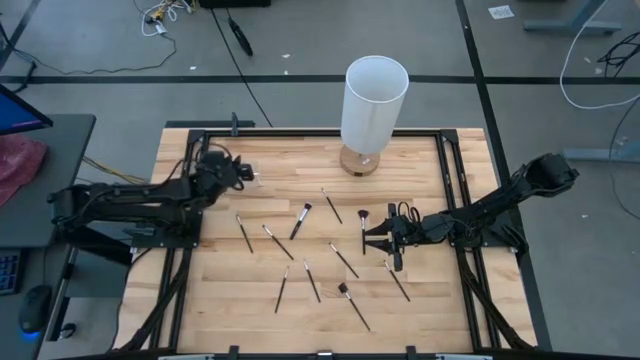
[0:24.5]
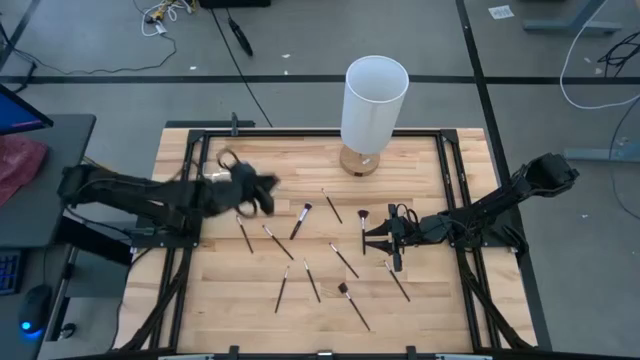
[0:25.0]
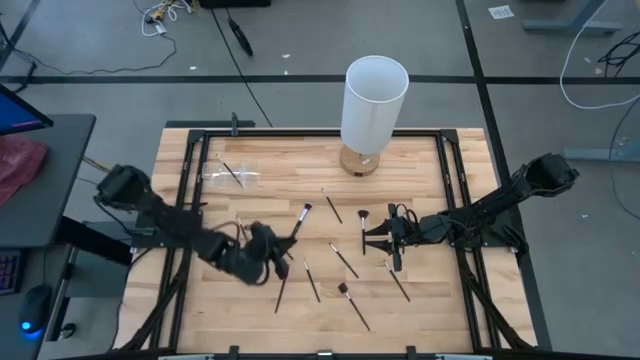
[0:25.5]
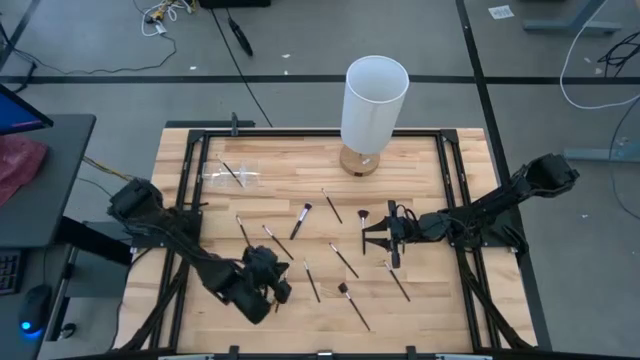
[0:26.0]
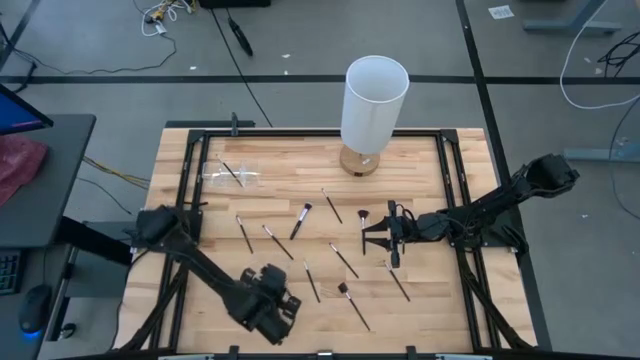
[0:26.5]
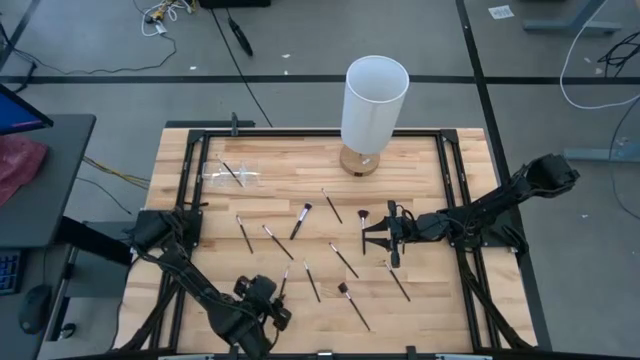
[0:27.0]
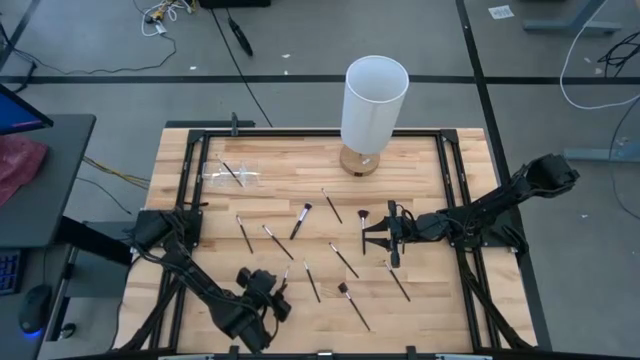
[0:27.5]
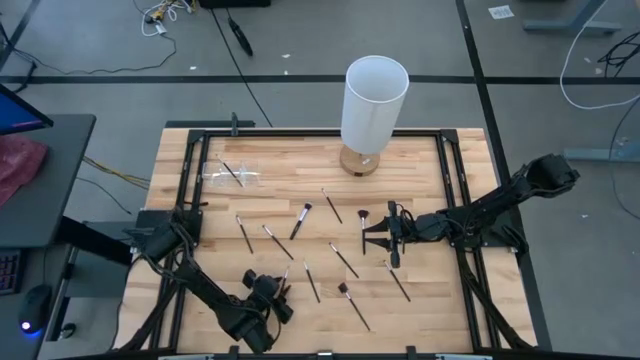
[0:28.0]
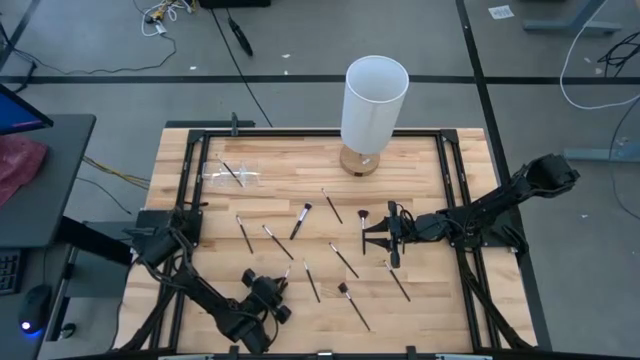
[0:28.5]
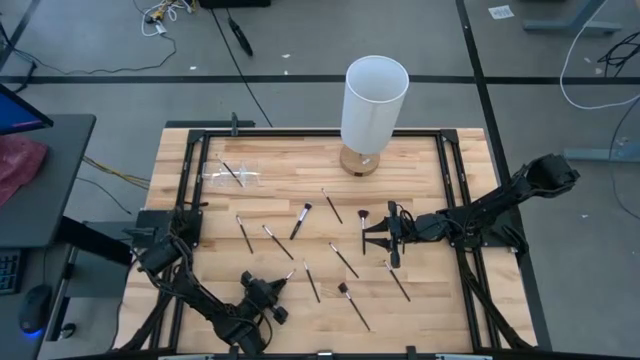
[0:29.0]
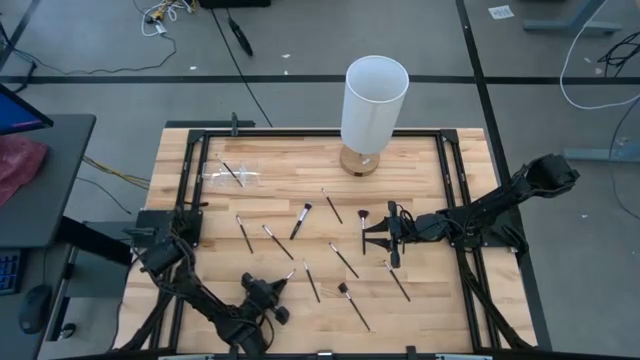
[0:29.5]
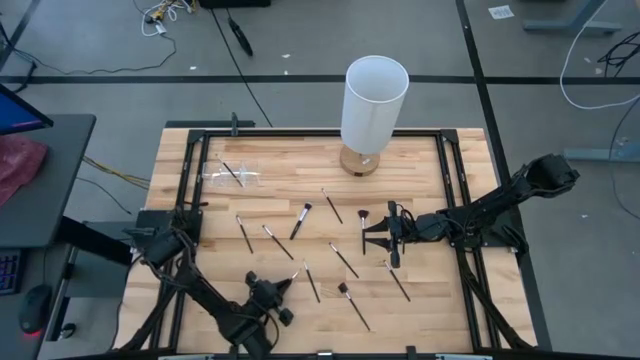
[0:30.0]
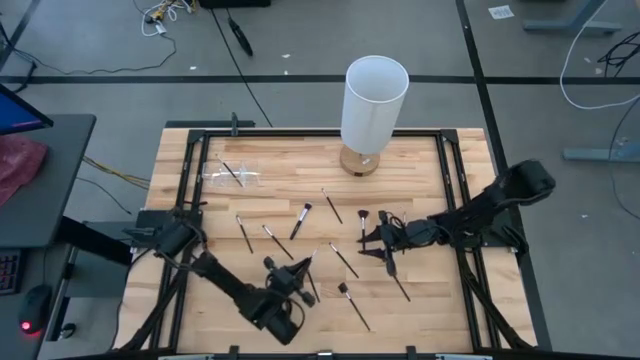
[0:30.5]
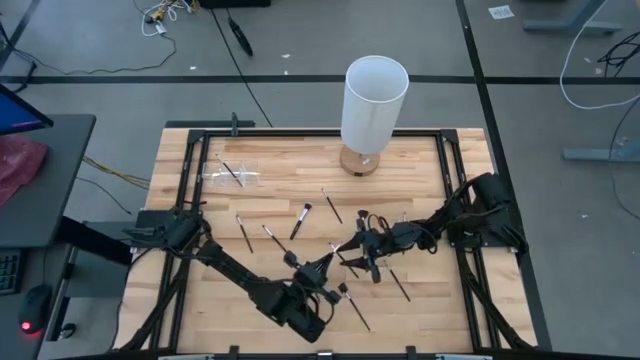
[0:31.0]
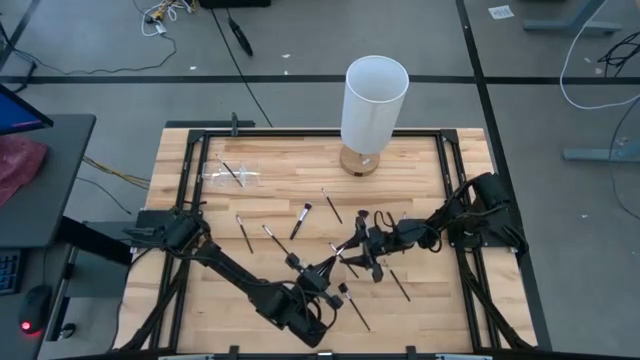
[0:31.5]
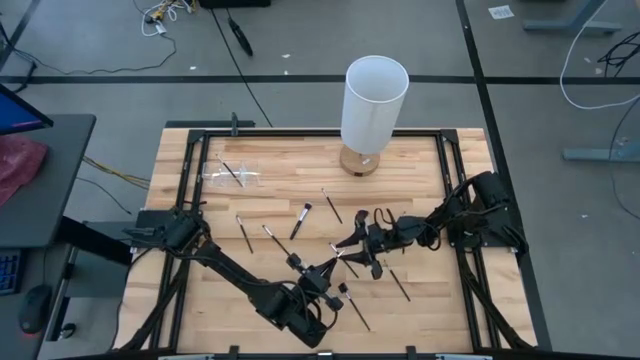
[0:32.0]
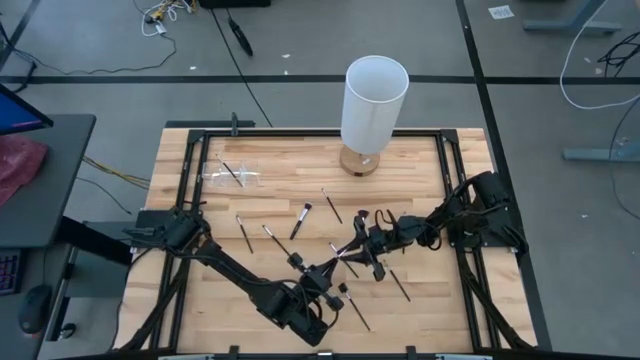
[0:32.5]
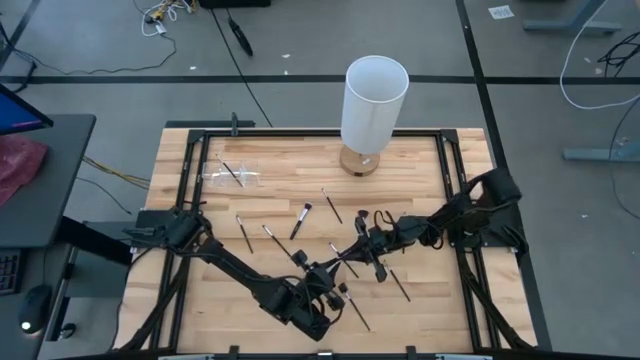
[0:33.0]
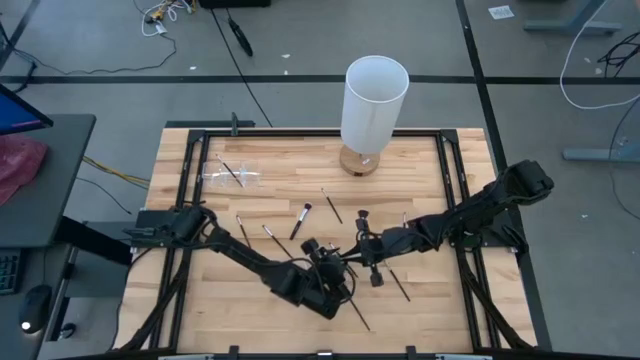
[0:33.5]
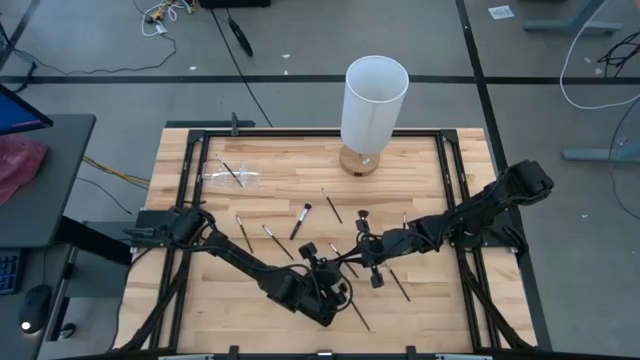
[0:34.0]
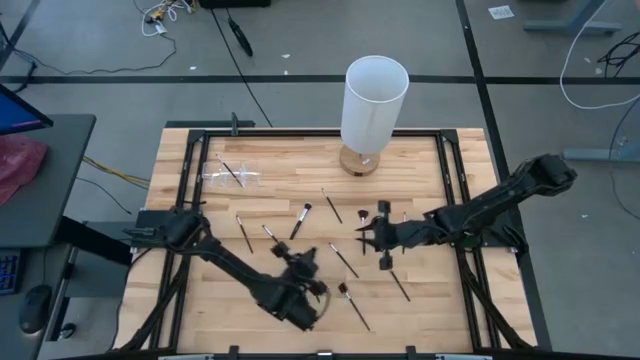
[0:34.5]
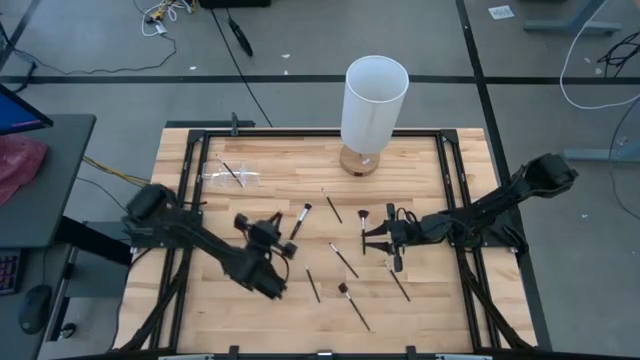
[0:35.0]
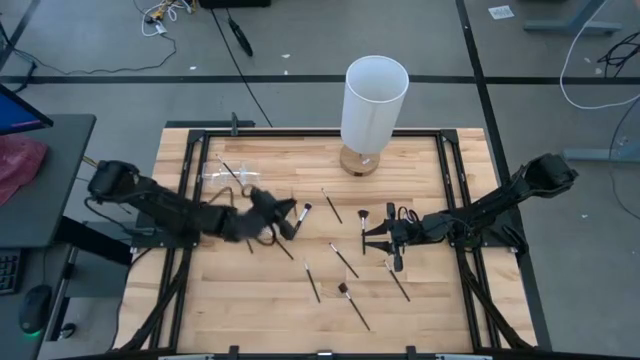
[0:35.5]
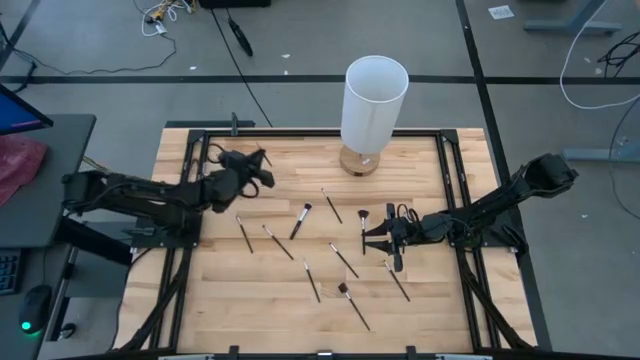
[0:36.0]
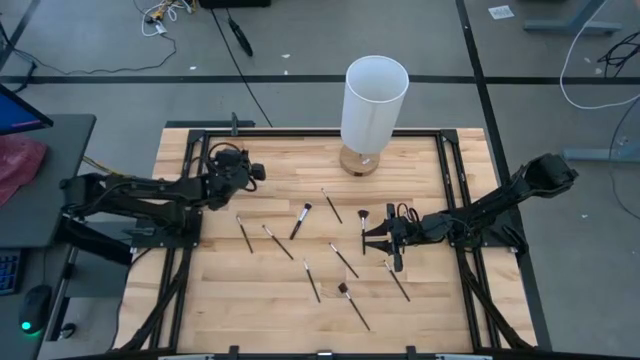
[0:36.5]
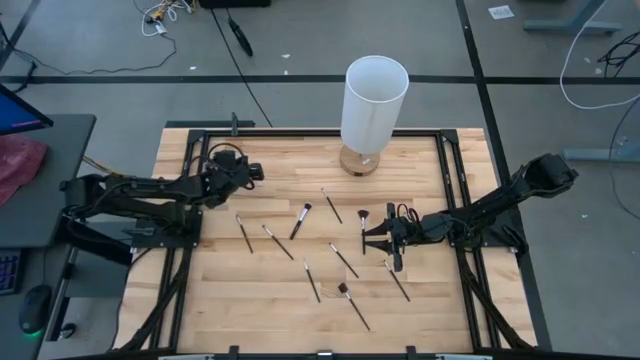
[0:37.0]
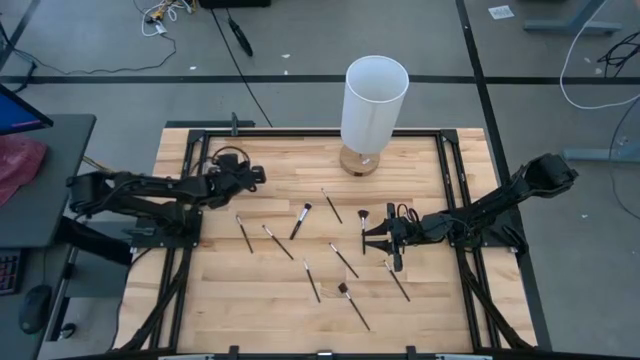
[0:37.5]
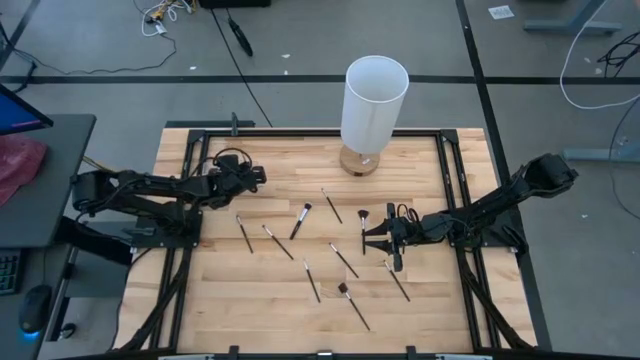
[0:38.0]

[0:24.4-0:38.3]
Task: Put items in baskets/containers
Put the black eyeshadow brush into the transparent organizer

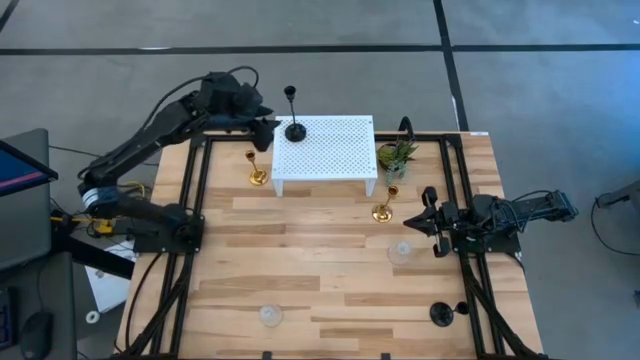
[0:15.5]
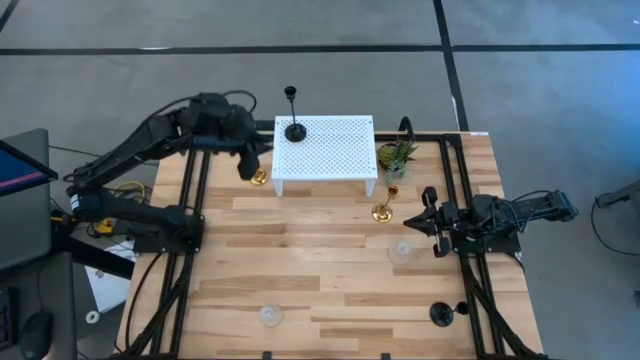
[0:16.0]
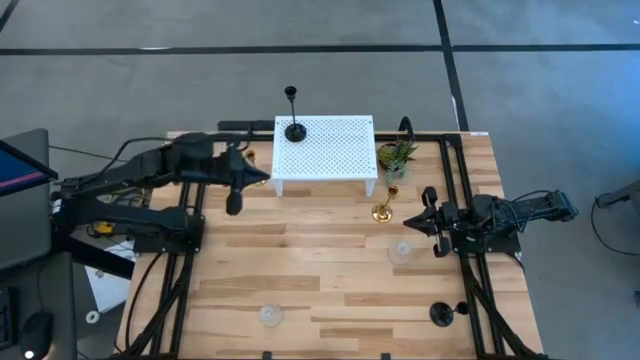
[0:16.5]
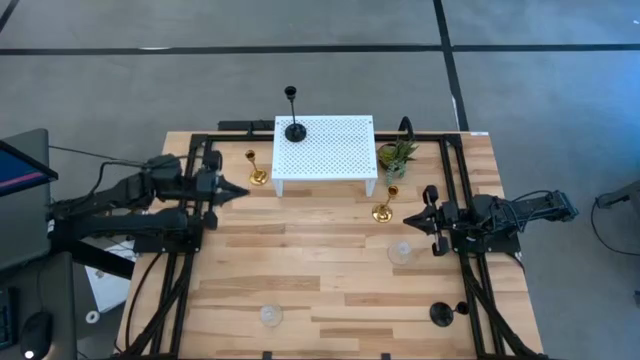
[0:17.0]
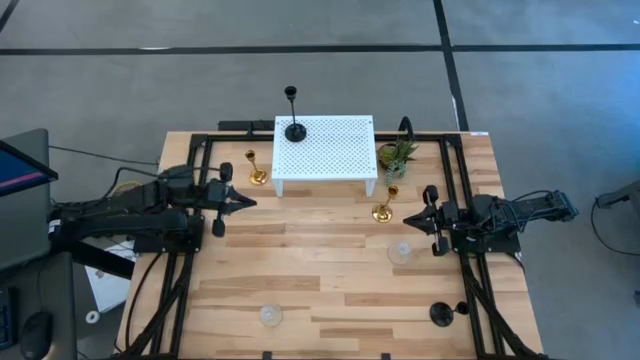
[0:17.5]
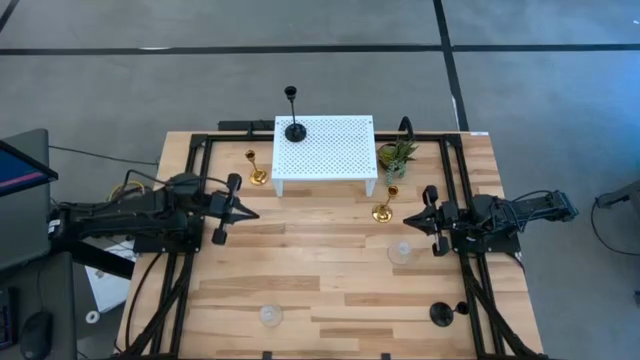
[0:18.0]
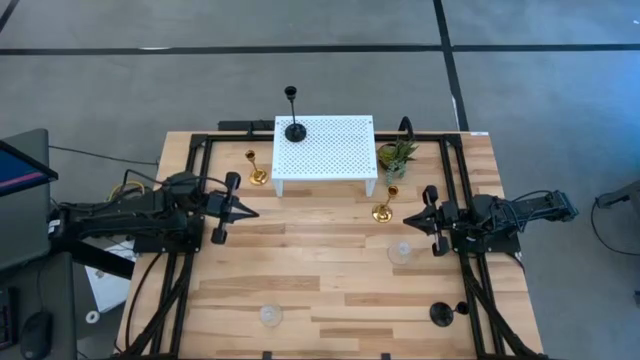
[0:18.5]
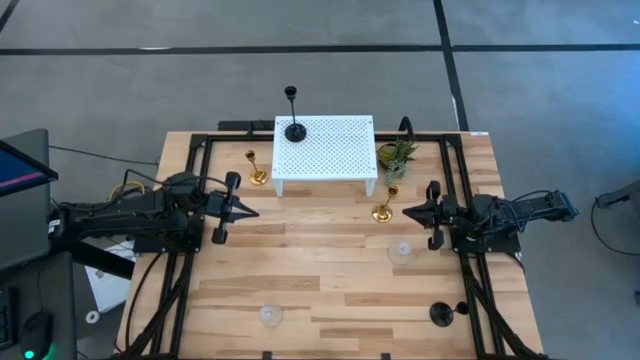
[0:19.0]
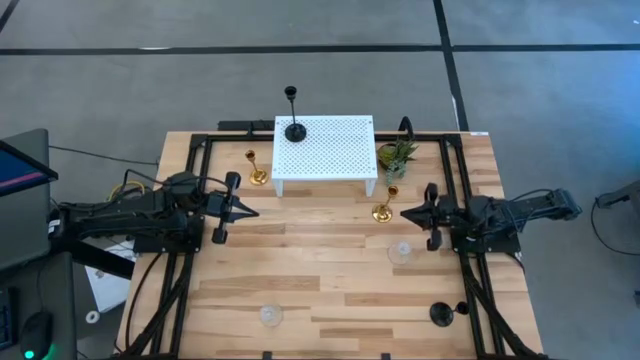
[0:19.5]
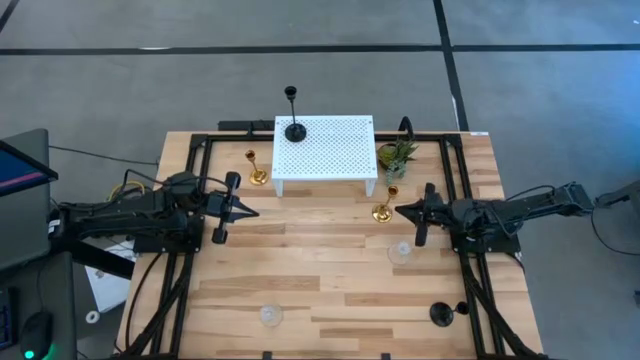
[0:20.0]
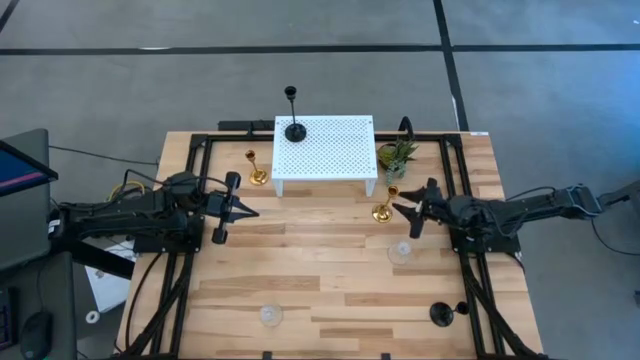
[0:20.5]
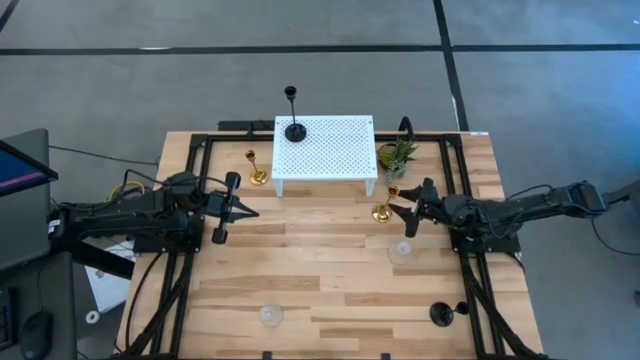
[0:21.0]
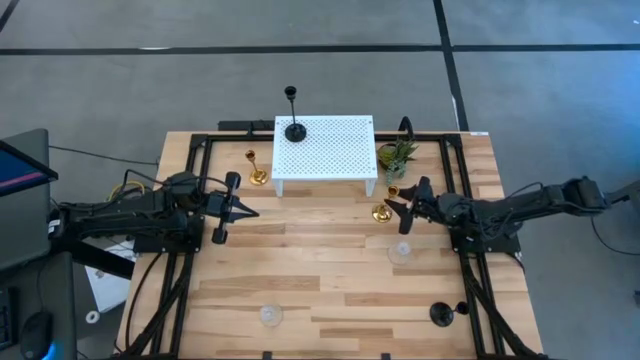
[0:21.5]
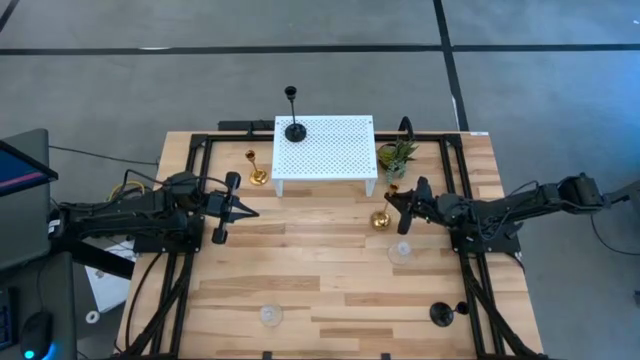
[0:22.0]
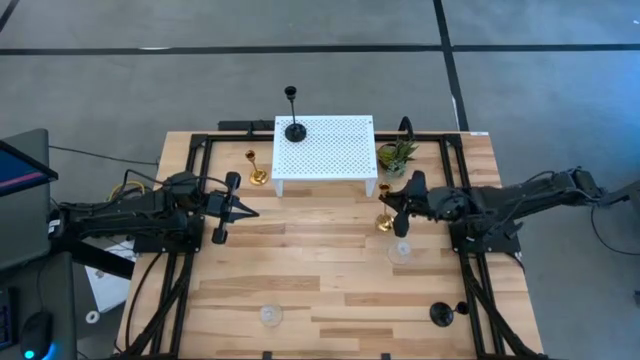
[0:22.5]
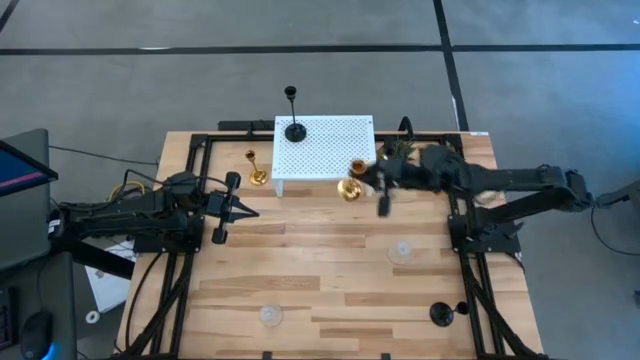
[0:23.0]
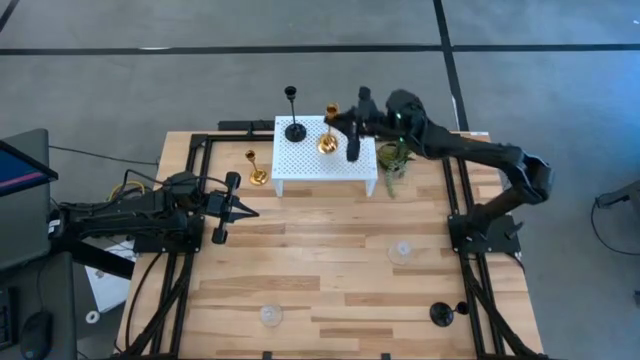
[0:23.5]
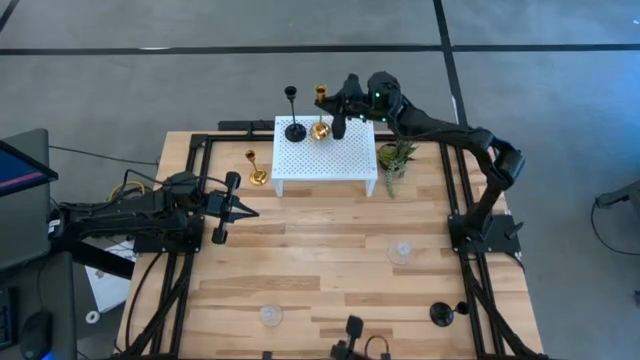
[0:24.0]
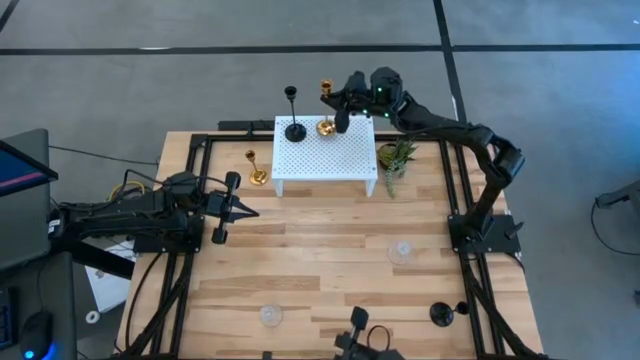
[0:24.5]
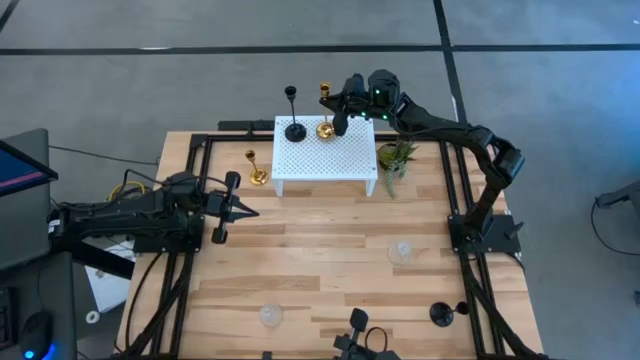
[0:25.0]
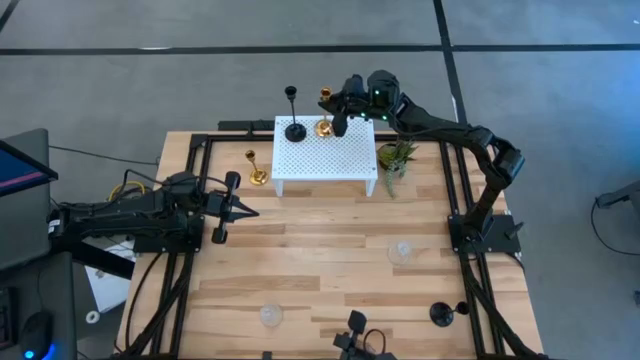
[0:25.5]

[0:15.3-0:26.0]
Task: Pick & Place candle stick holders
Put the right gold candle holder on the shelf
